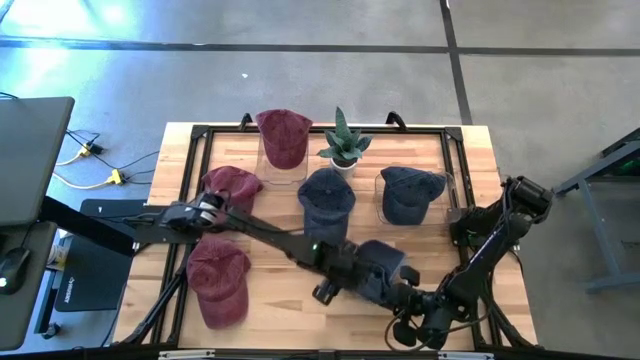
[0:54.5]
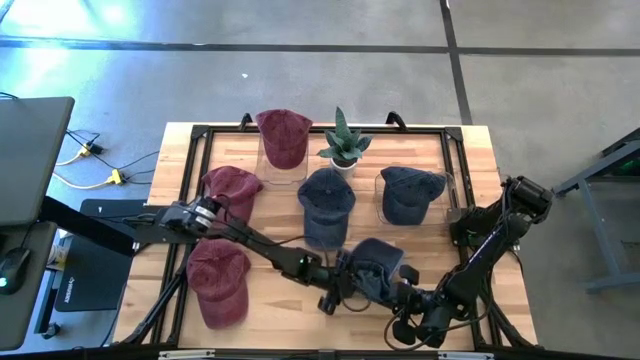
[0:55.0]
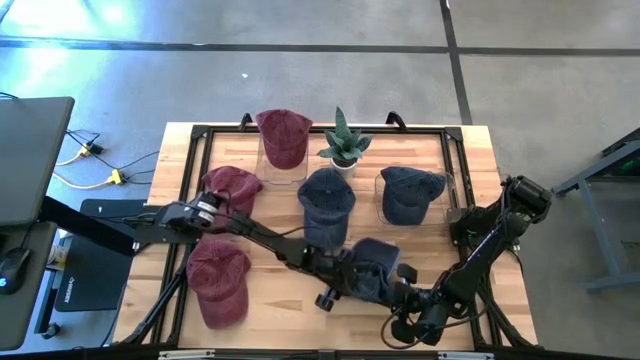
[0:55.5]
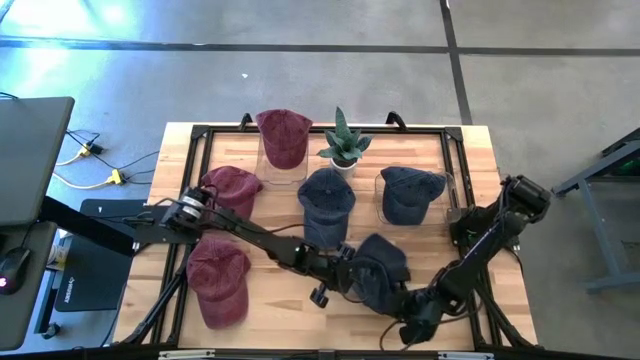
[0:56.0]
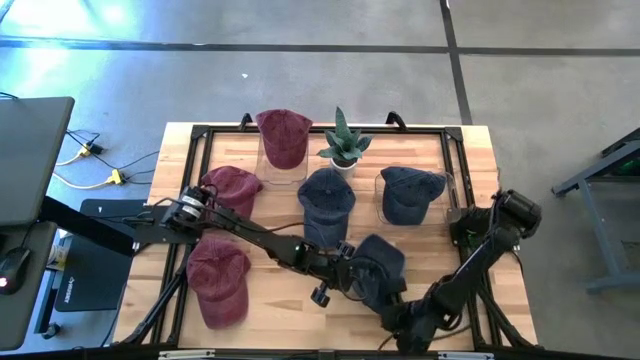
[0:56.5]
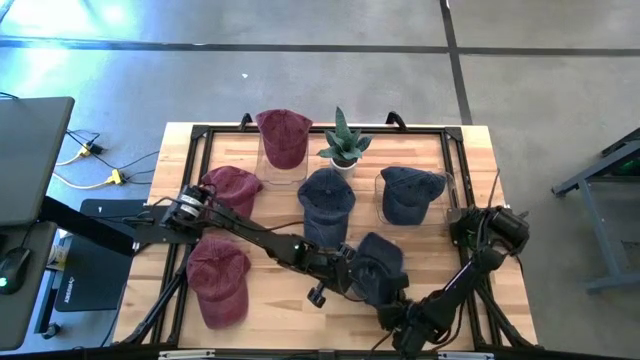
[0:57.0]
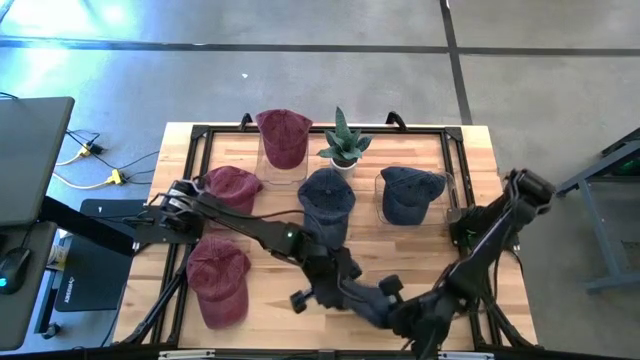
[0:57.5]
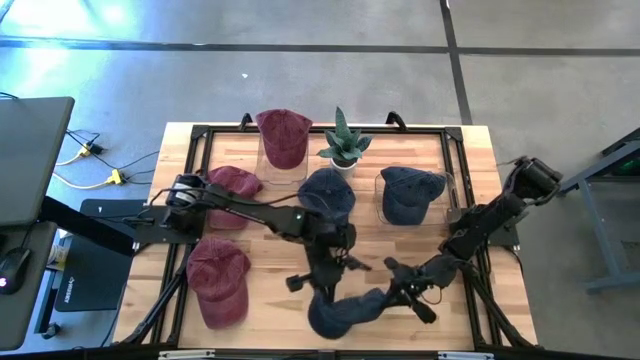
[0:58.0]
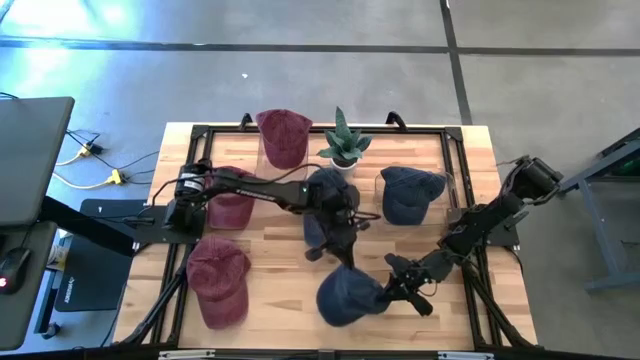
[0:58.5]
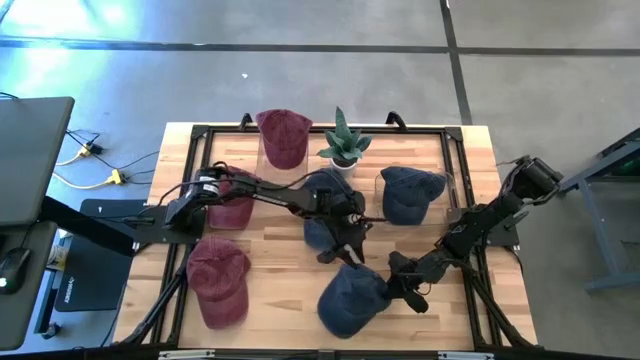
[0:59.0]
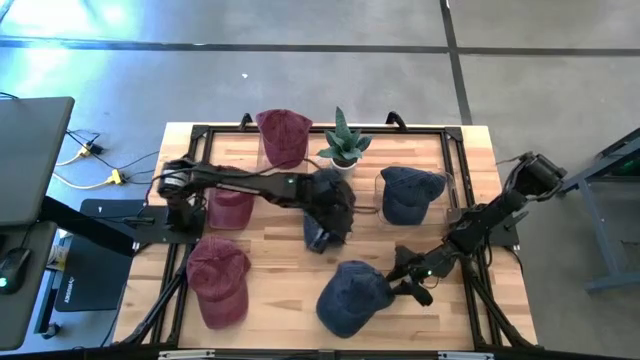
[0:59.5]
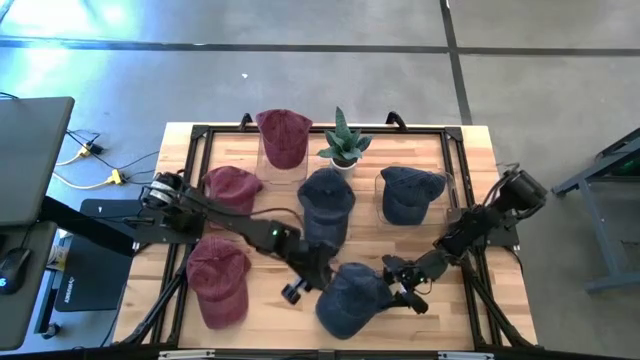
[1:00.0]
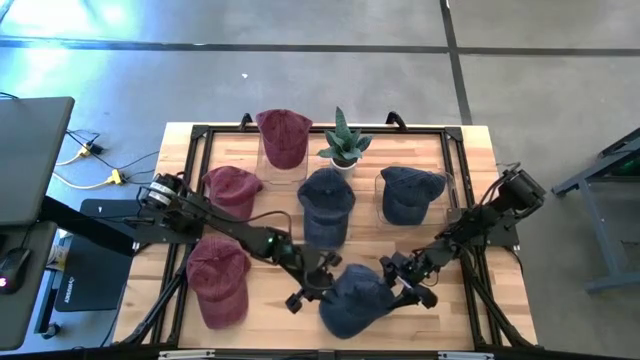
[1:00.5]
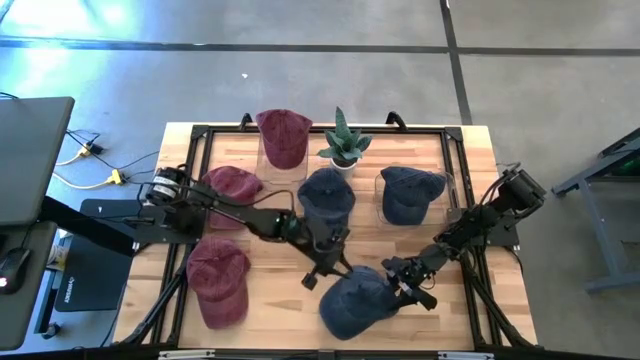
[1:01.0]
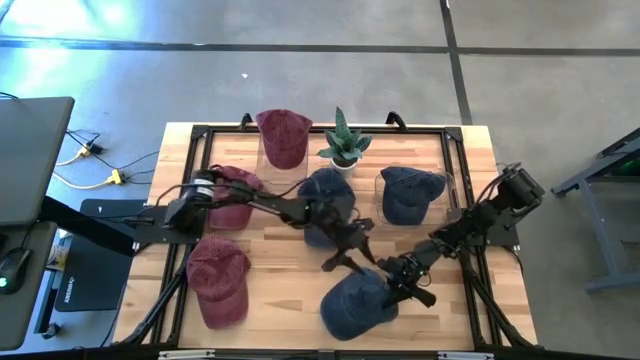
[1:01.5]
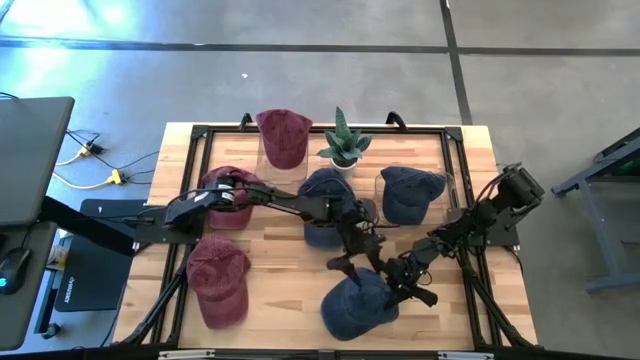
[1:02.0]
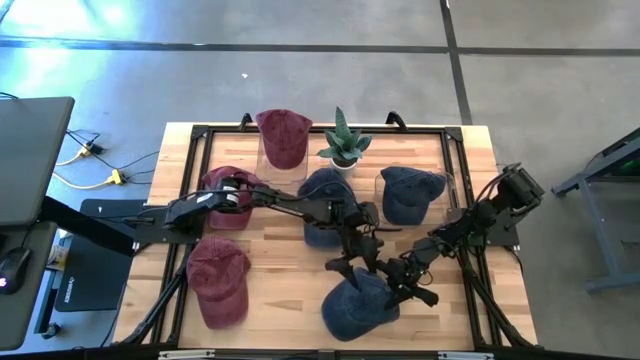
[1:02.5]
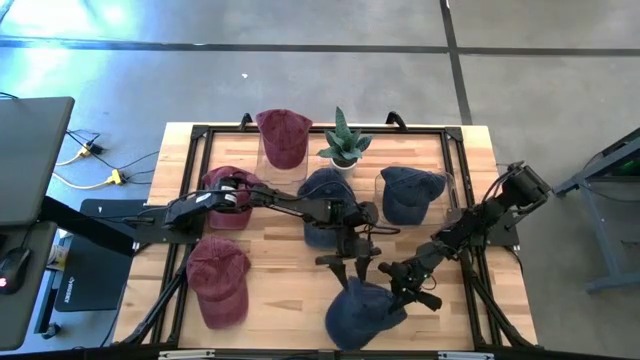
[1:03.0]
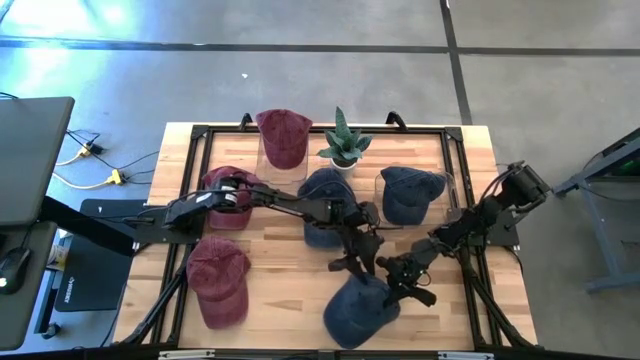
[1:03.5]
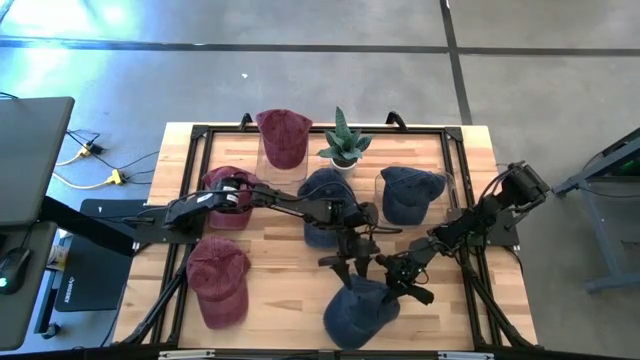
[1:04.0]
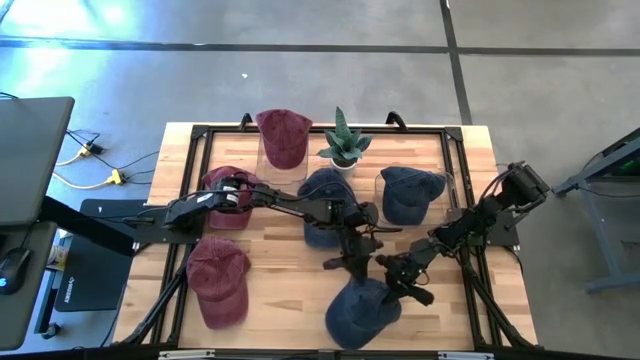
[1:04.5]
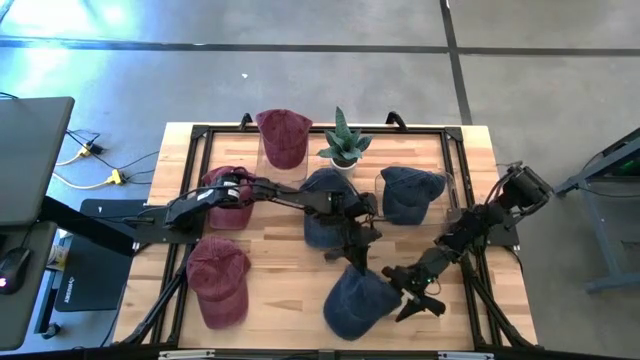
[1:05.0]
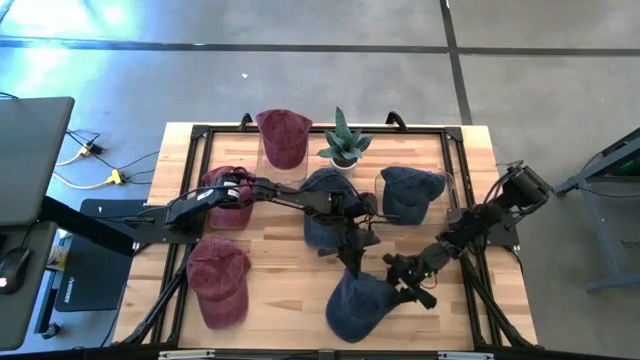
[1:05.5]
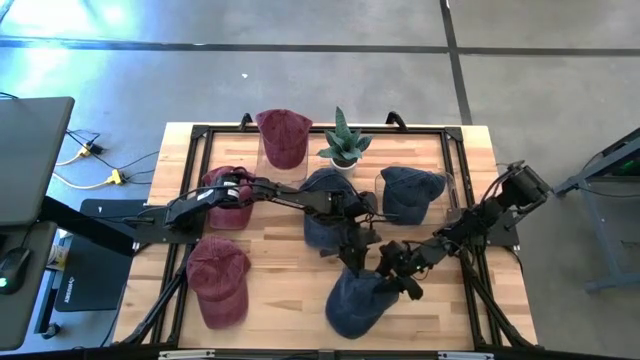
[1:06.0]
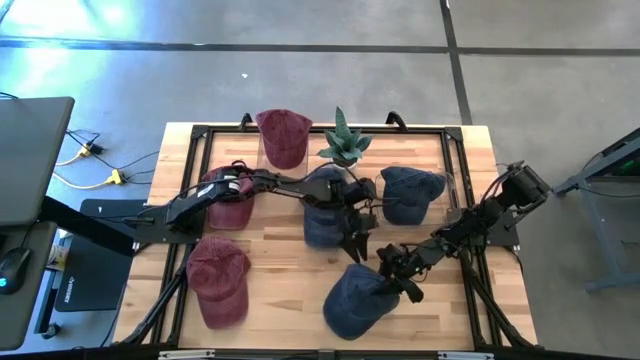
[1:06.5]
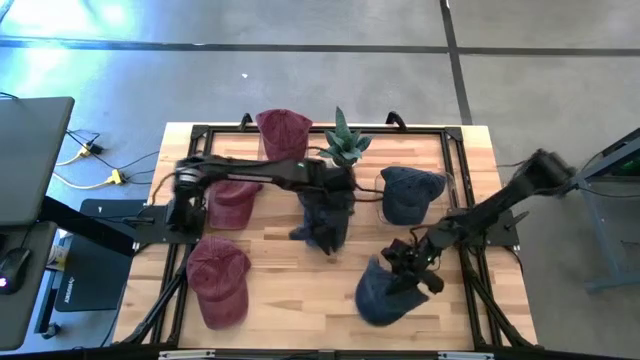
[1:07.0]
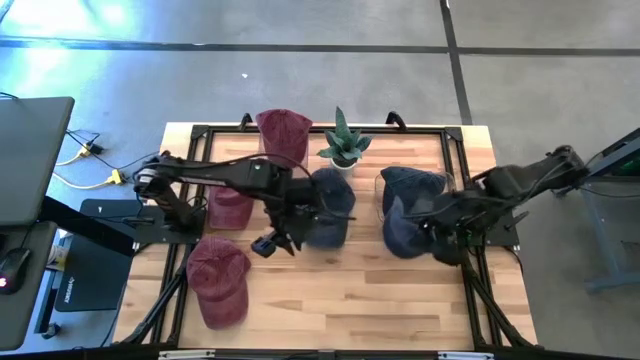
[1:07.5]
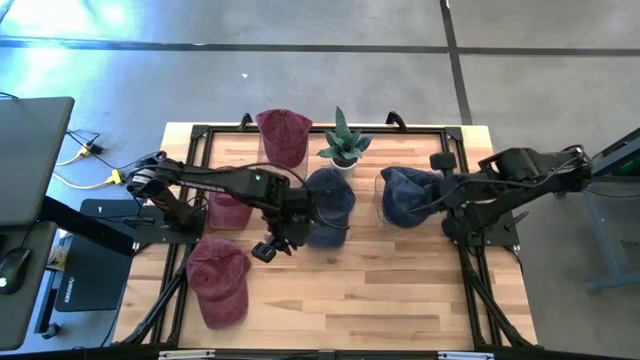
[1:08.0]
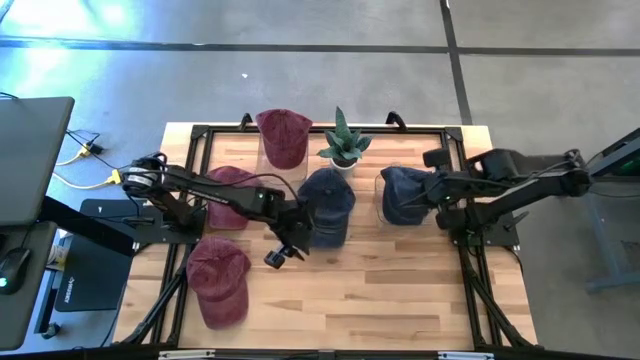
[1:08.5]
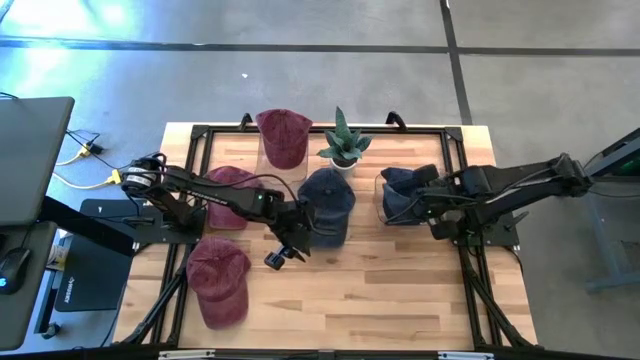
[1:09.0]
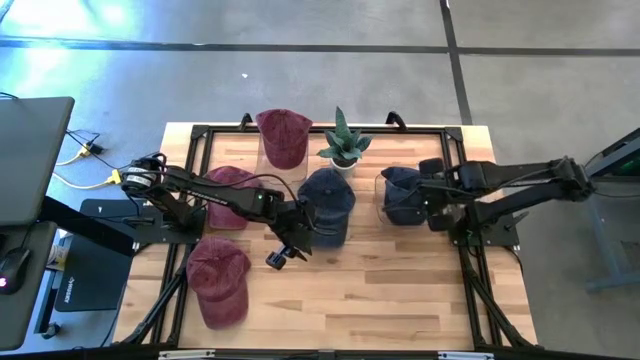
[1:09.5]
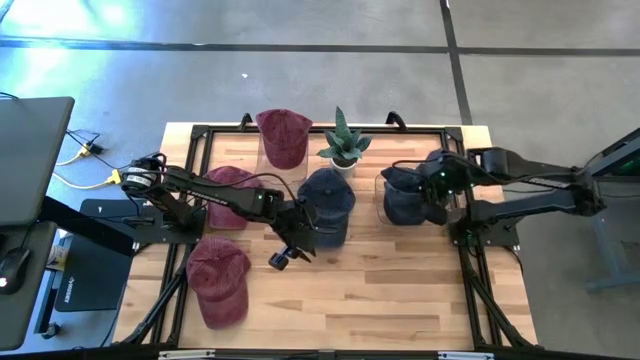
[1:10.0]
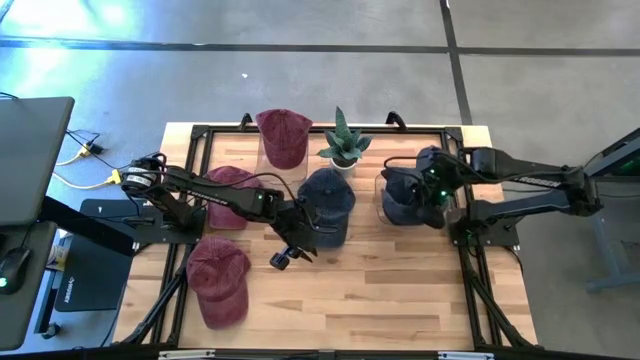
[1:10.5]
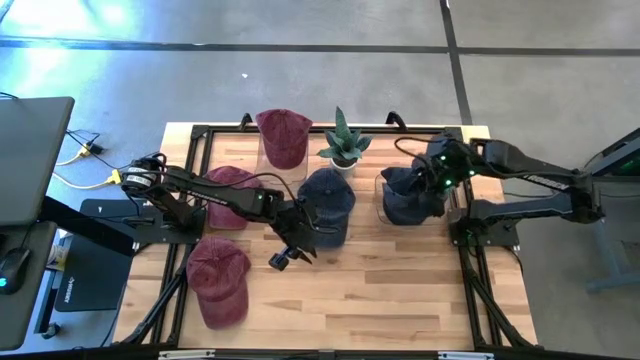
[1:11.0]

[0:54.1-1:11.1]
Task: Pick & Place hat
Put the bottom blue cap into the right transparent bin

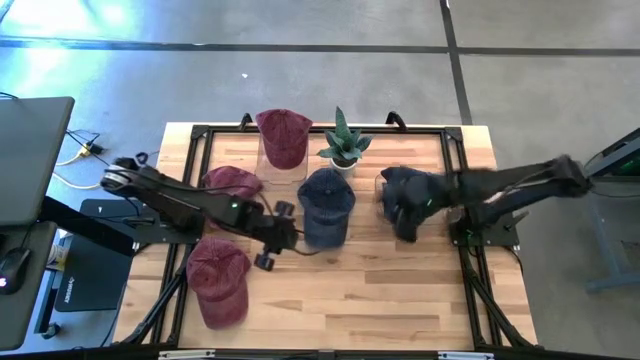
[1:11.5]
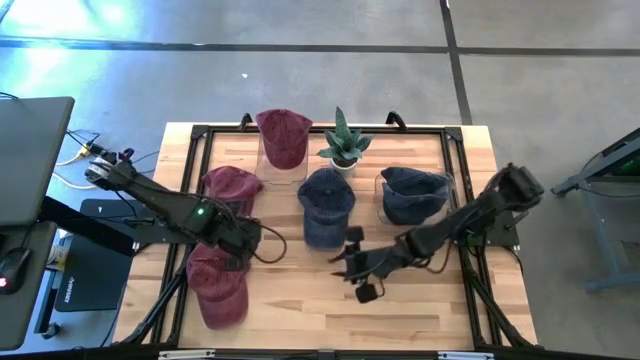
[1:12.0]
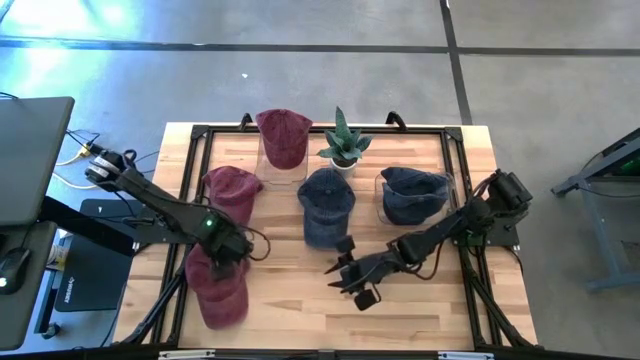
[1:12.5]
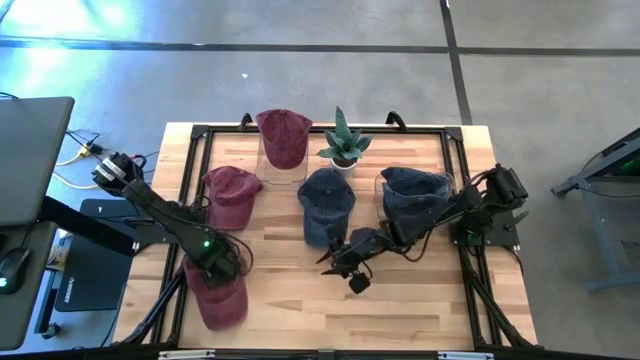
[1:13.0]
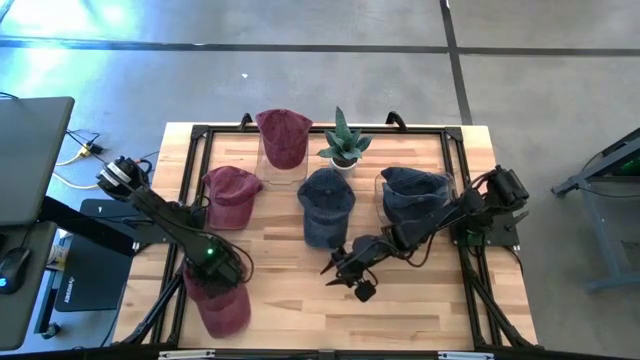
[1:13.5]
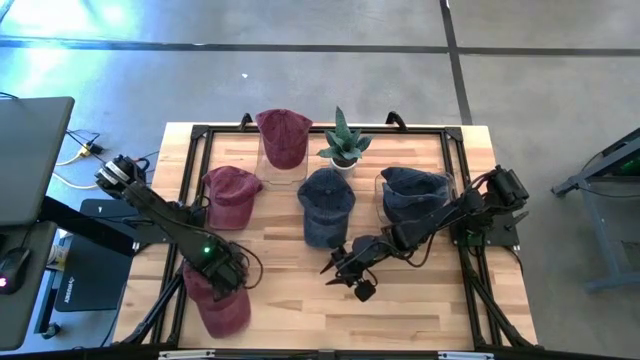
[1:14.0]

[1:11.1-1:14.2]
Put the bottom red cap into the left transparent bin
